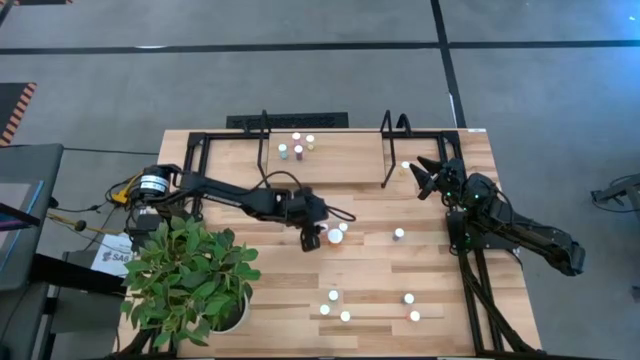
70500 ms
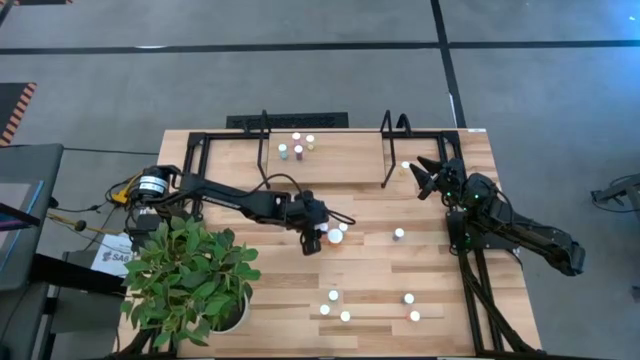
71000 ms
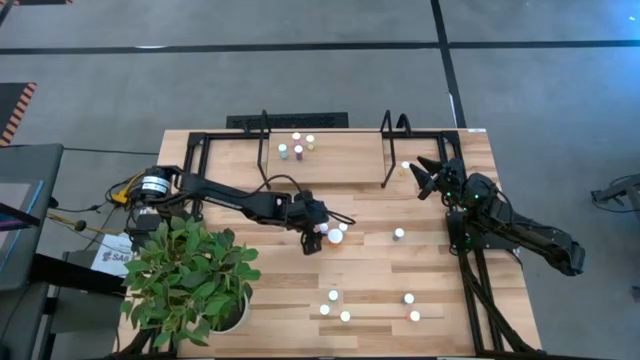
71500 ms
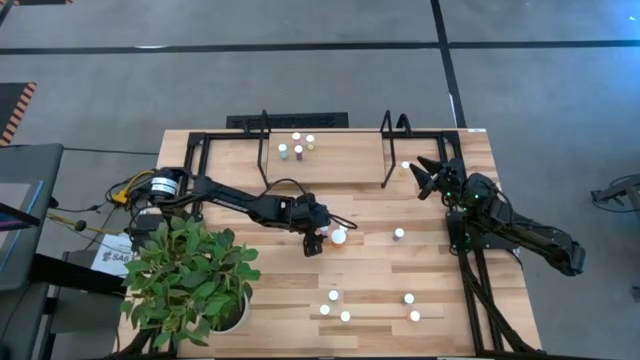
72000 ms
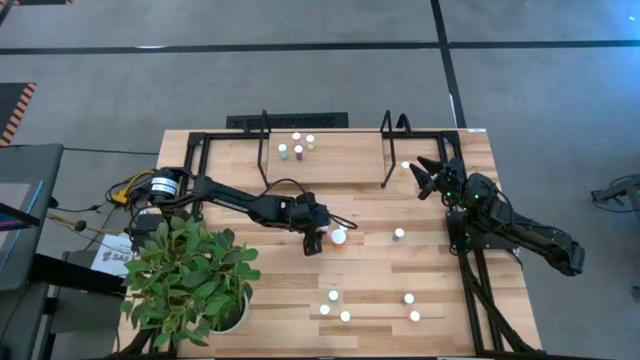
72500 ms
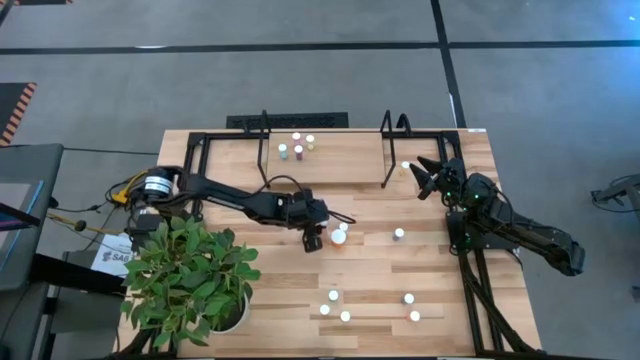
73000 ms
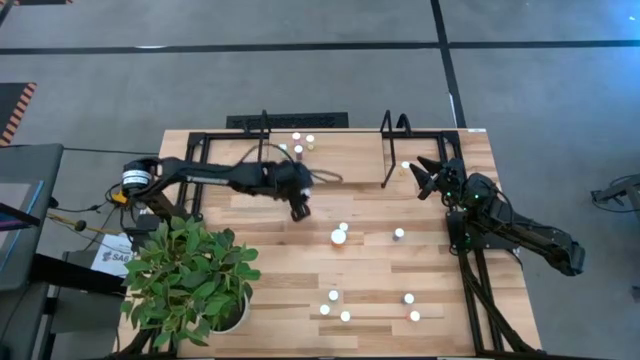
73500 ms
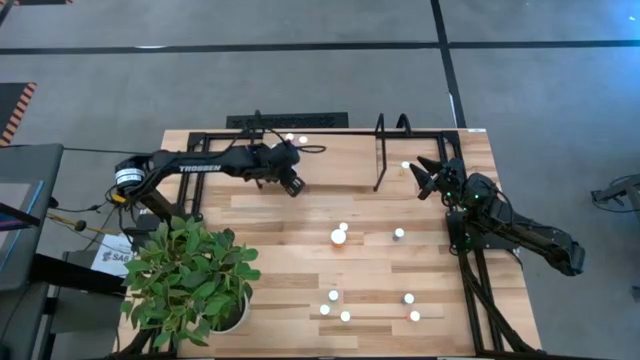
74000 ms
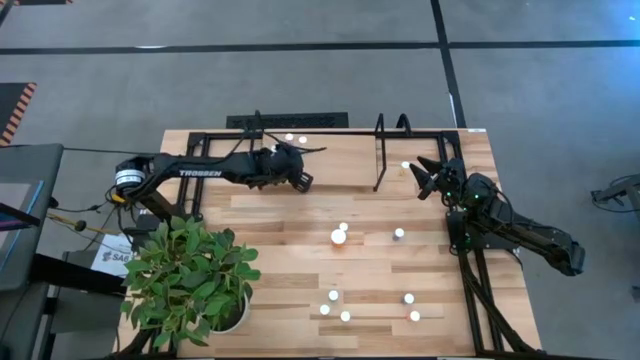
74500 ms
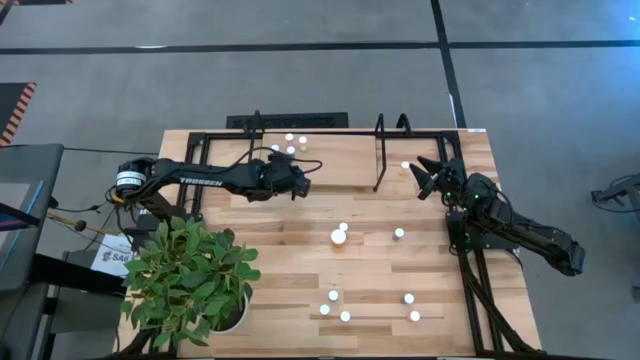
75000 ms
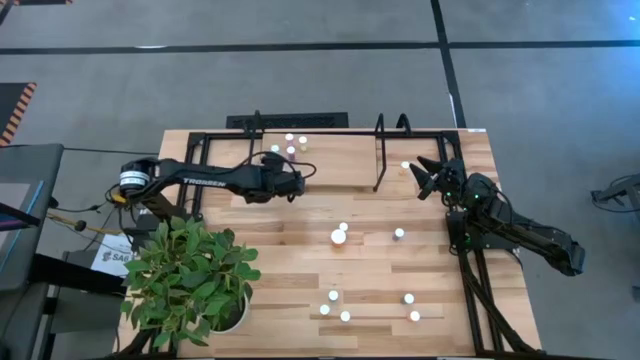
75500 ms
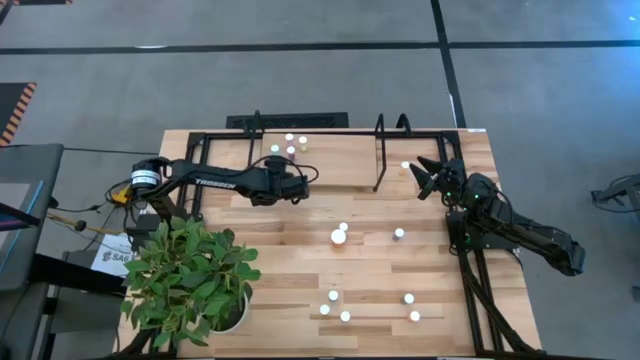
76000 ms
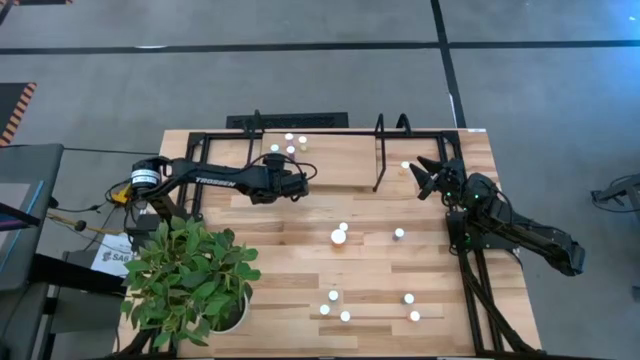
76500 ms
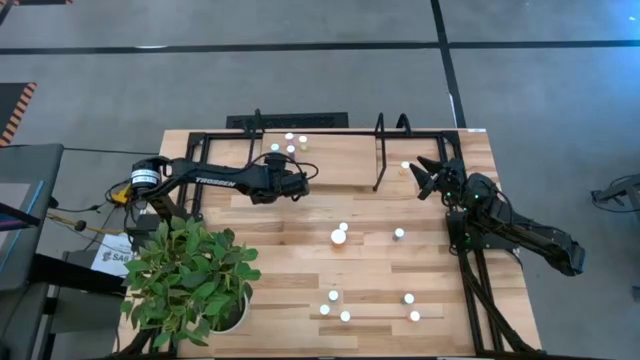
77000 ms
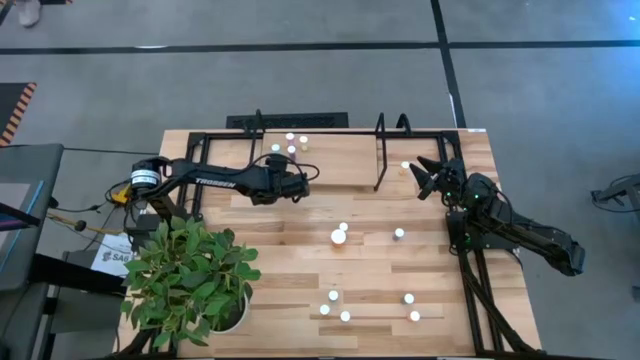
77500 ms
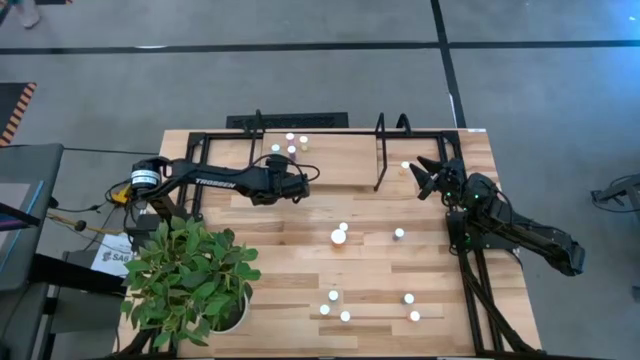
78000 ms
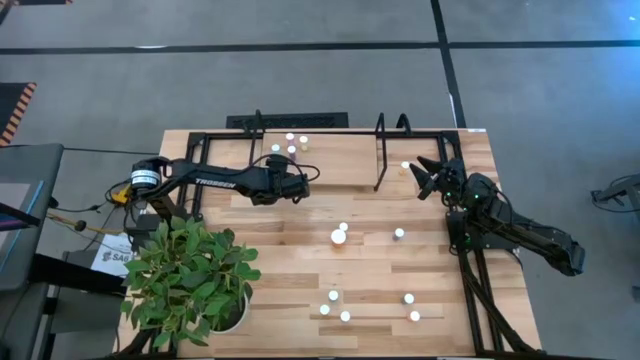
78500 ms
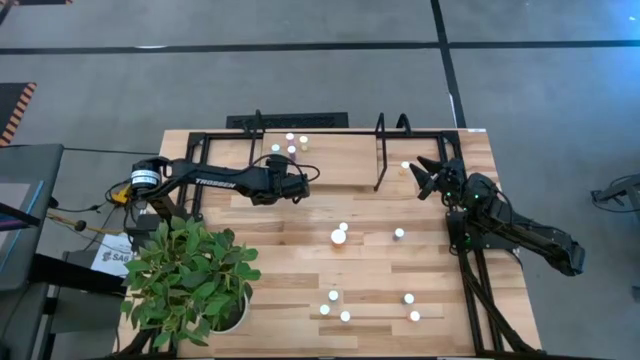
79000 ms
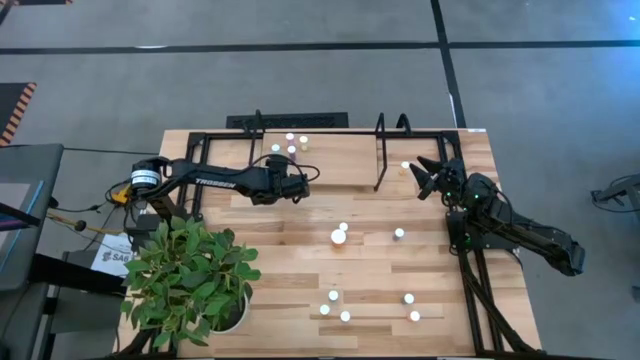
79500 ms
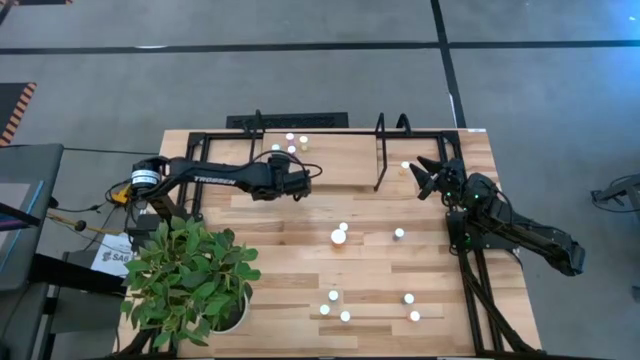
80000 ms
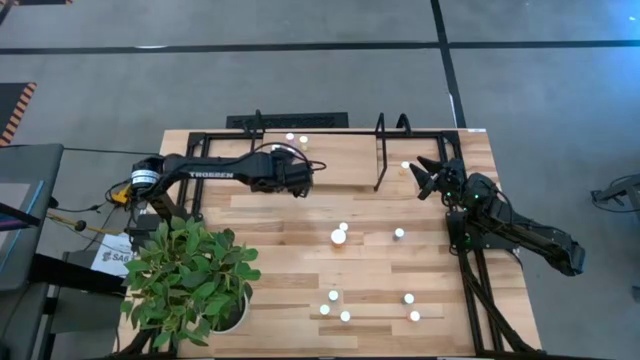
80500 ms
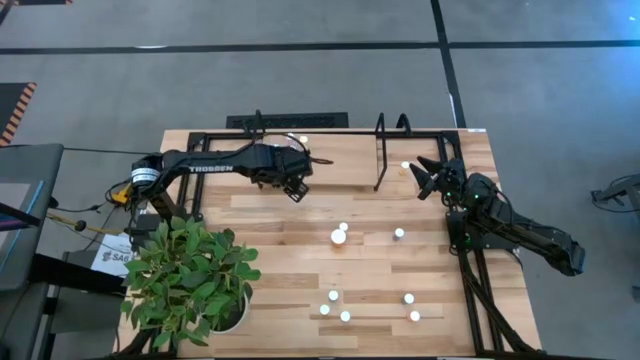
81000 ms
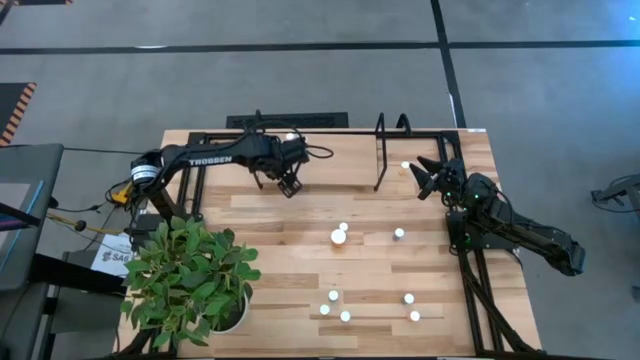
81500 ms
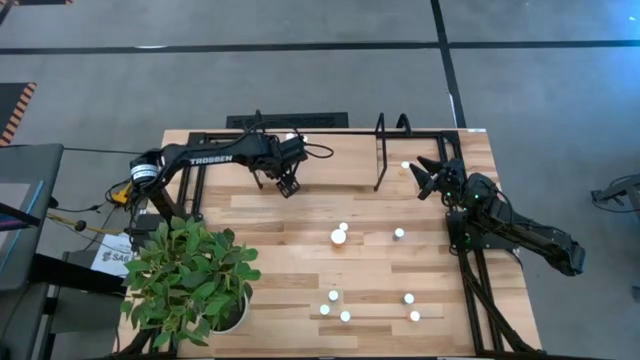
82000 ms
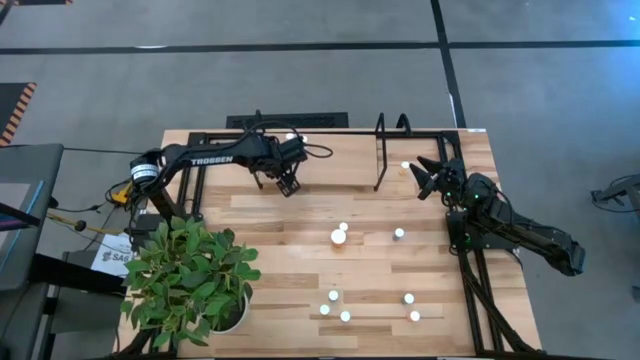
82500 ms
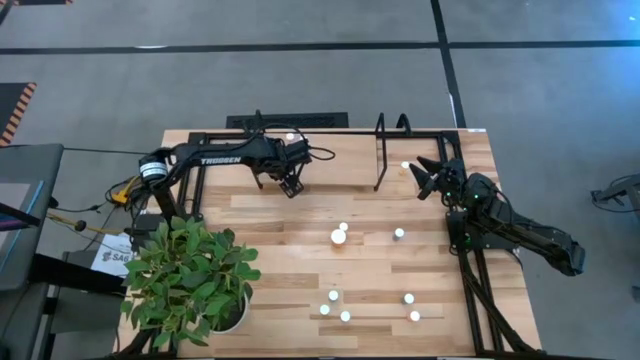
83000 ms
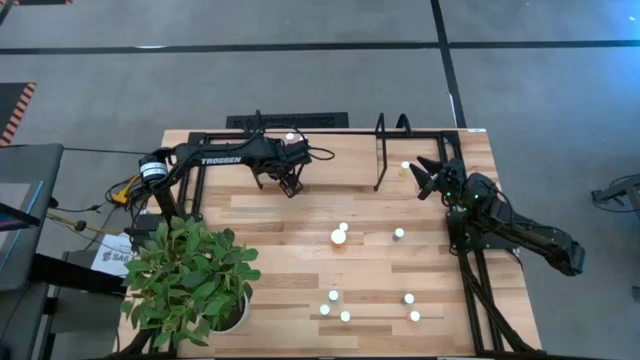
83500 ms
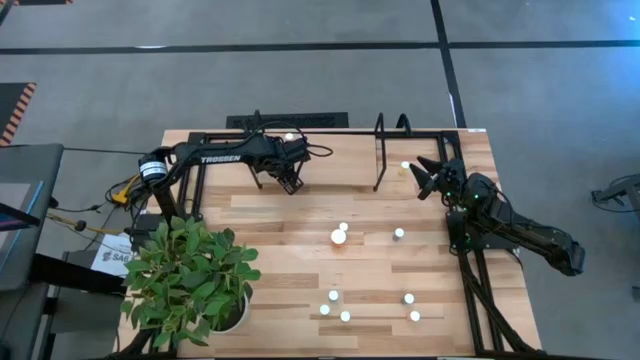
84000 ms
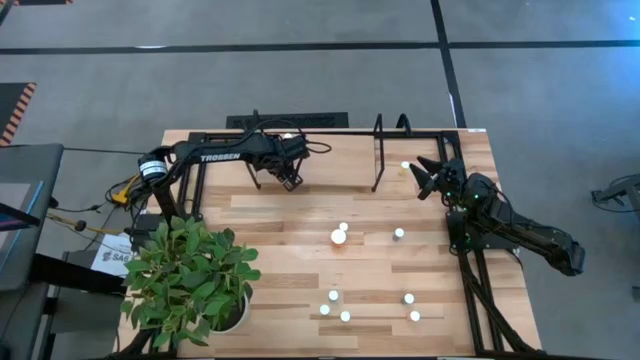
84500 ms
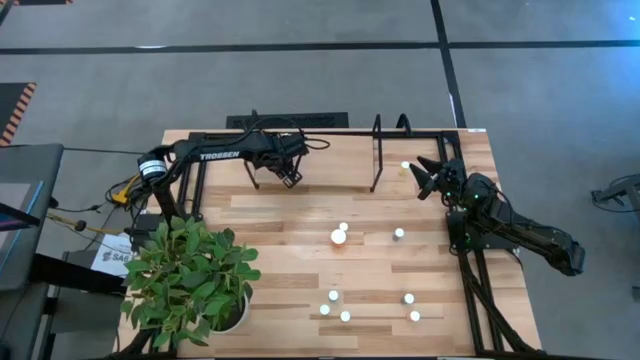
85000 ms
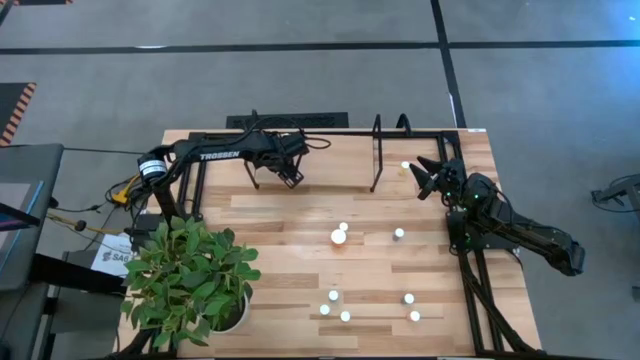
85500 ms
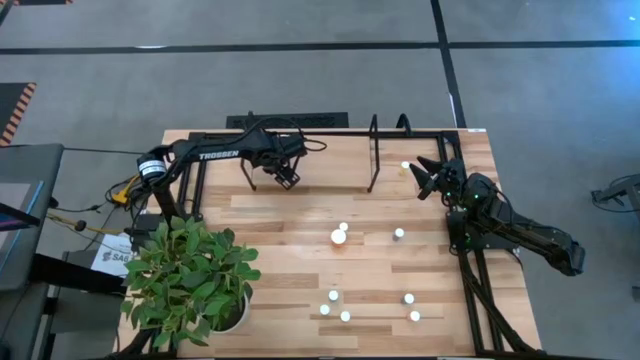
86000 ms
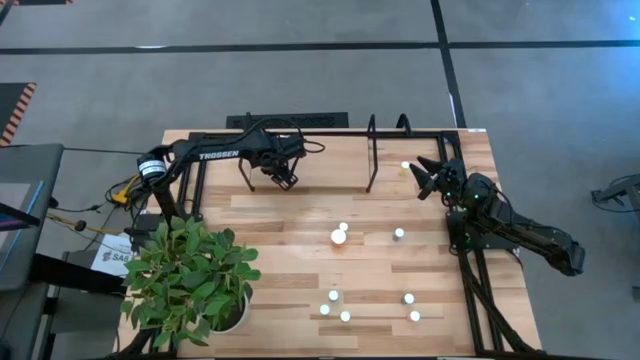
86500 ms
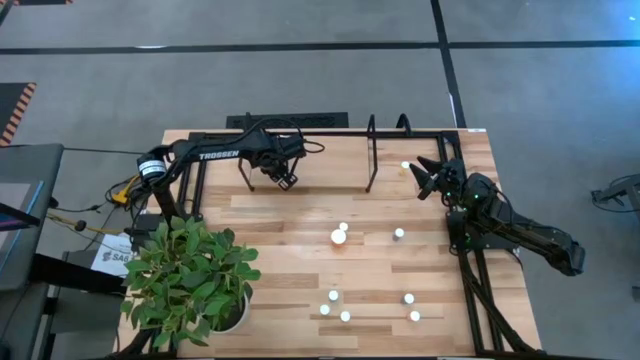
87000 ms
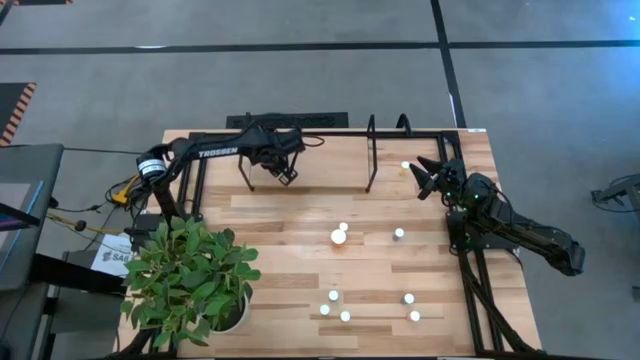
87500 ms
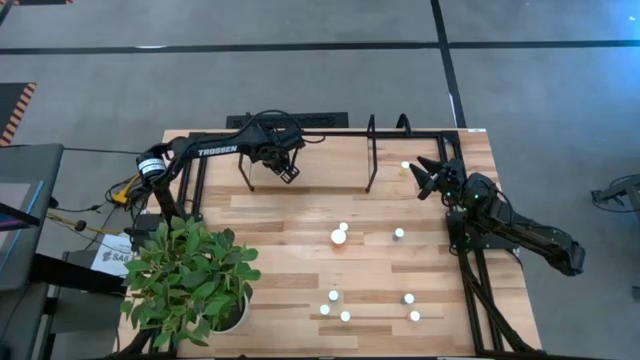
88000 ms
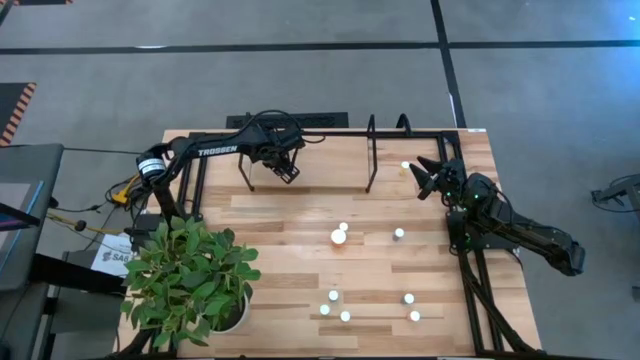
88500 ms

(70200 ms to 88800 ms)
Task: Pick and place medicine bottles onto shelf by color
Put the pink pill bottle on the shelf

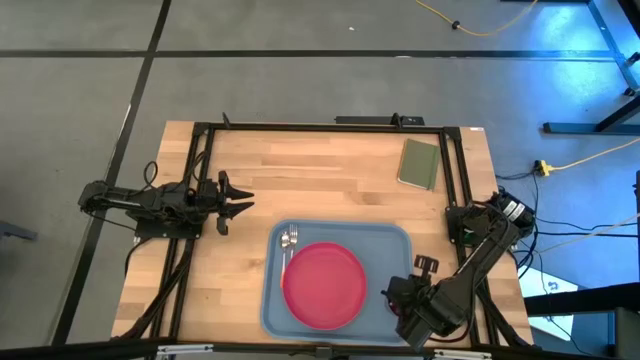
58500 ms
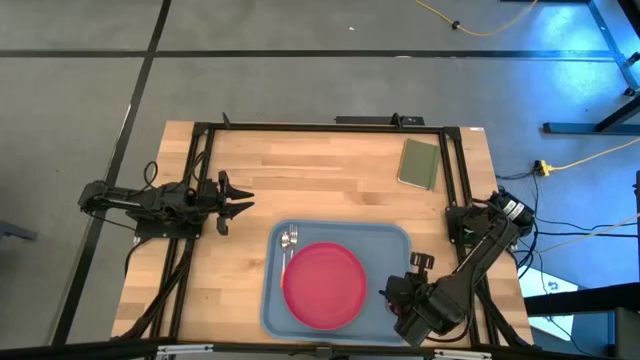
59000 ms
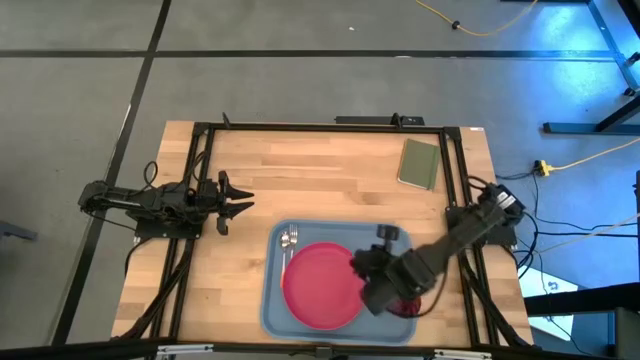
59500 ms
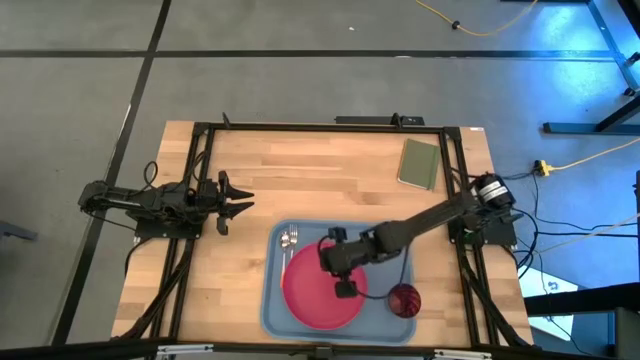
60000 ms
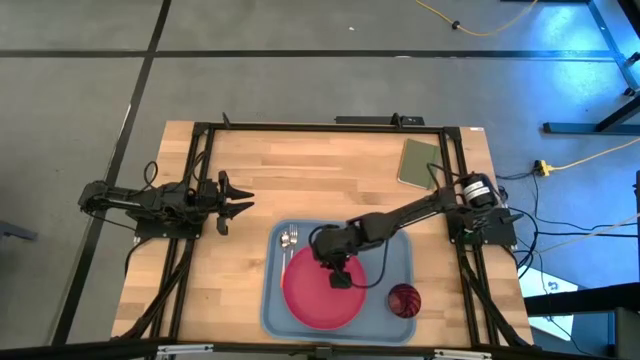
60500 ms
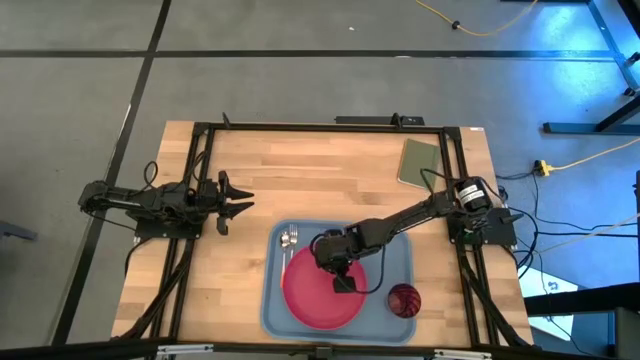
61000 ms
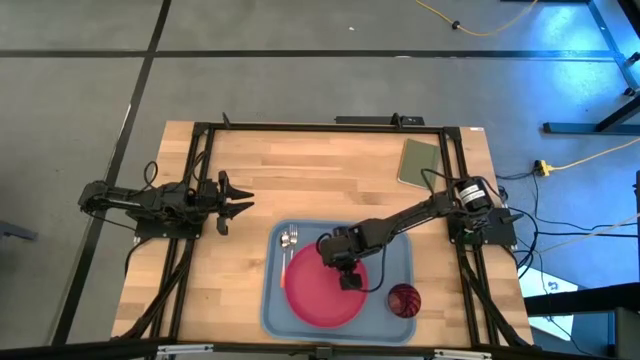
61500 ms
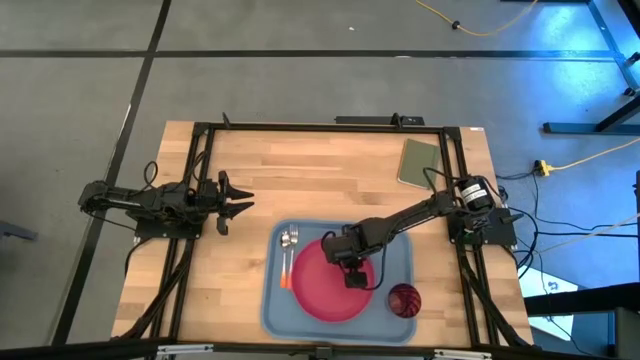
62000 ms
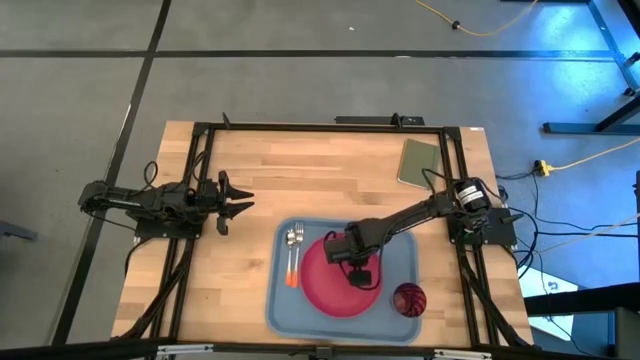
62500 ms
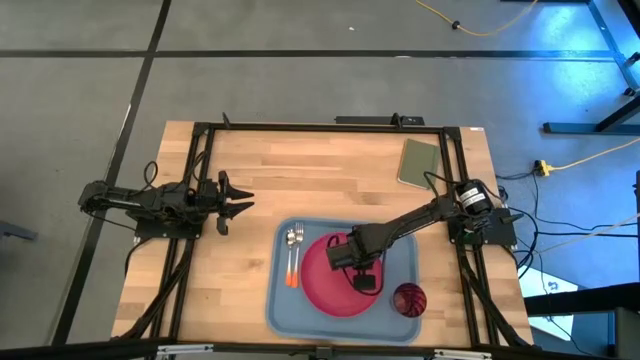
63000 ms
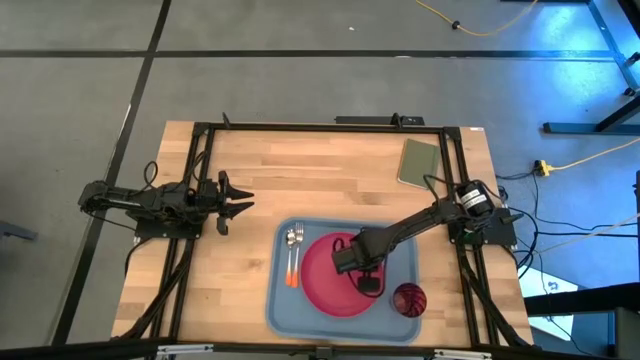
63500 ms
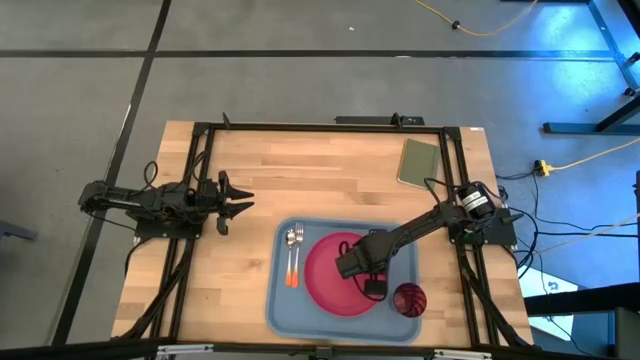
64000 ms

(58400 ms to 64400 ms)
Task: Pick and place plate/cup/fork/spoon on tray
Adjust the pink plate on the blue tray
